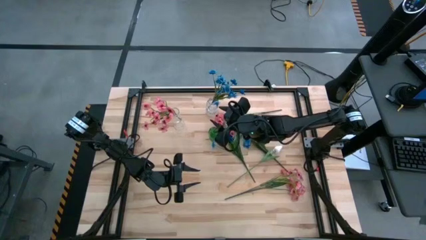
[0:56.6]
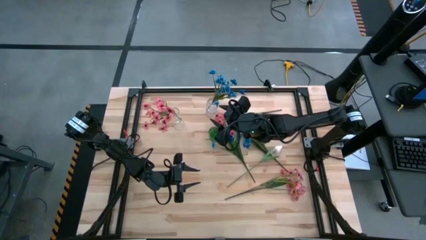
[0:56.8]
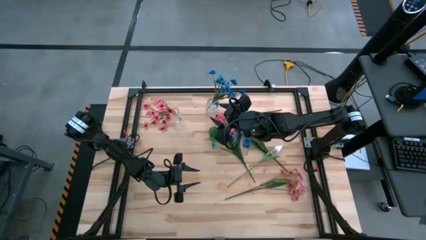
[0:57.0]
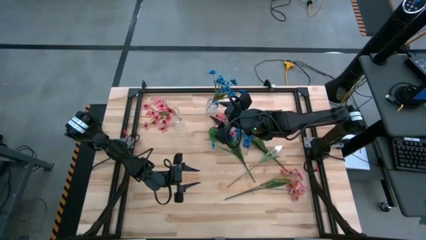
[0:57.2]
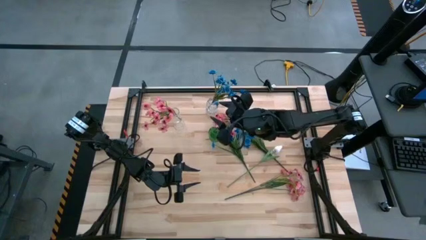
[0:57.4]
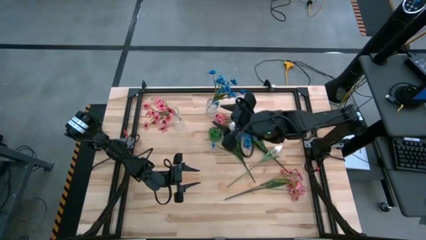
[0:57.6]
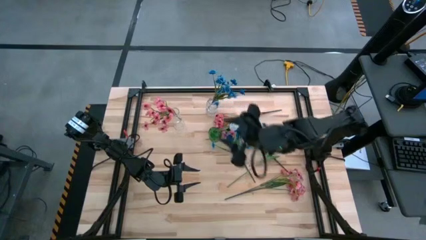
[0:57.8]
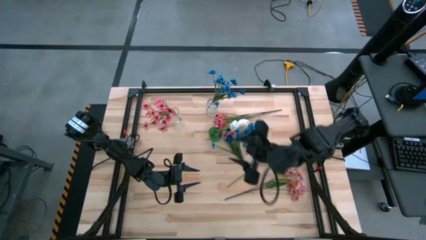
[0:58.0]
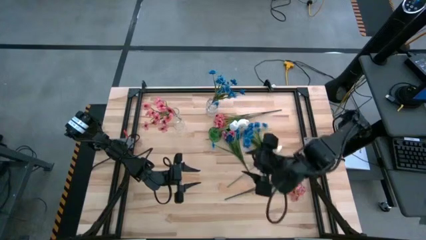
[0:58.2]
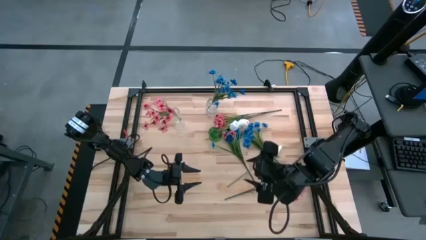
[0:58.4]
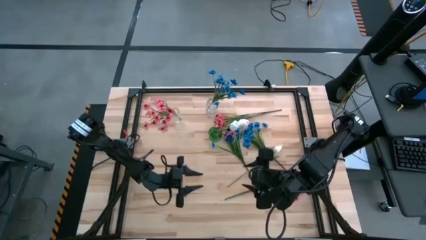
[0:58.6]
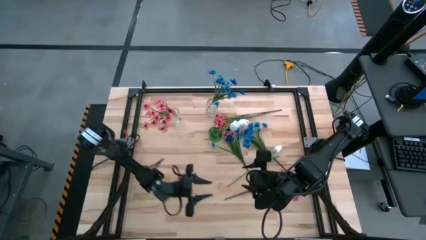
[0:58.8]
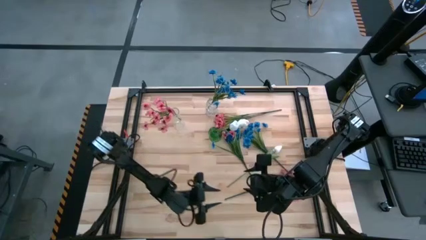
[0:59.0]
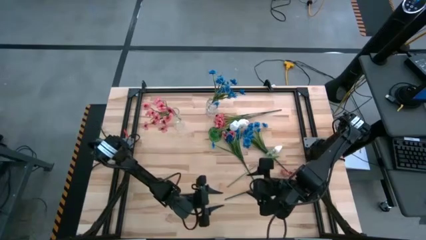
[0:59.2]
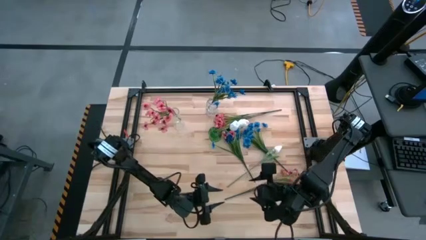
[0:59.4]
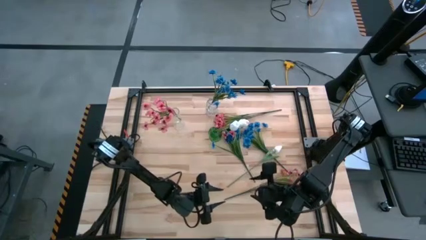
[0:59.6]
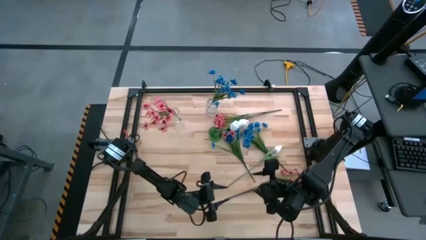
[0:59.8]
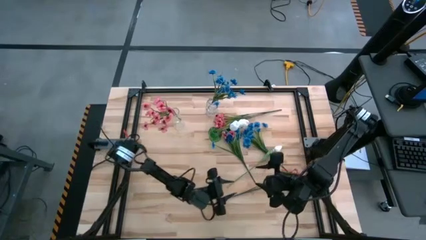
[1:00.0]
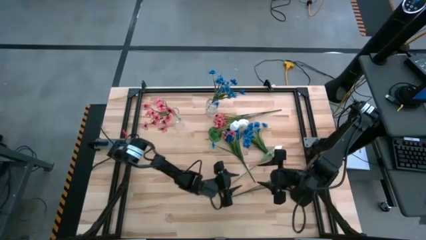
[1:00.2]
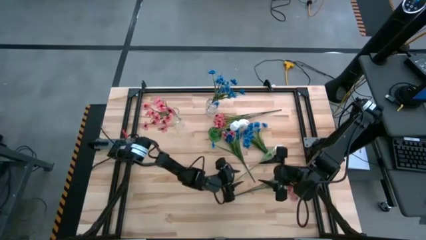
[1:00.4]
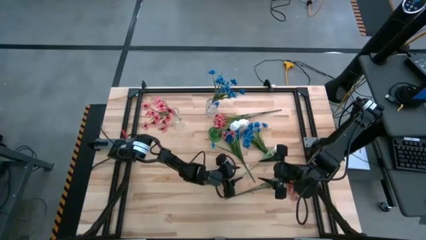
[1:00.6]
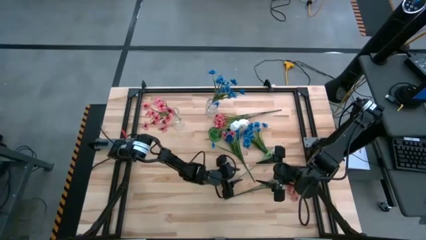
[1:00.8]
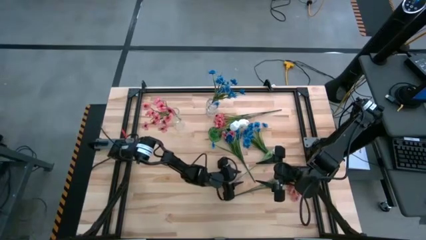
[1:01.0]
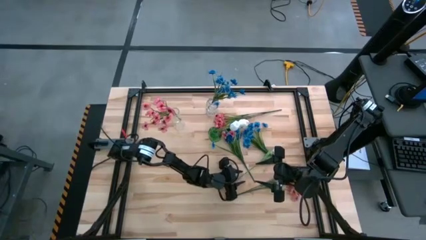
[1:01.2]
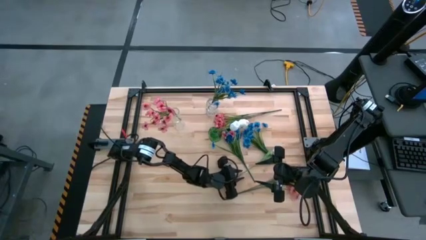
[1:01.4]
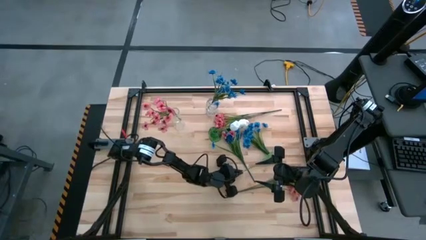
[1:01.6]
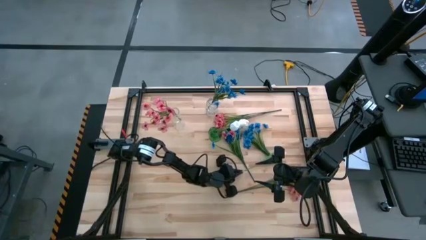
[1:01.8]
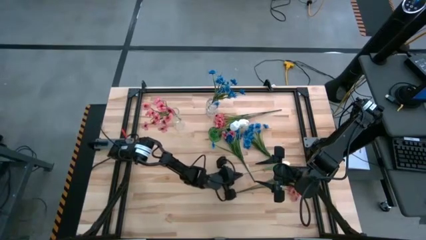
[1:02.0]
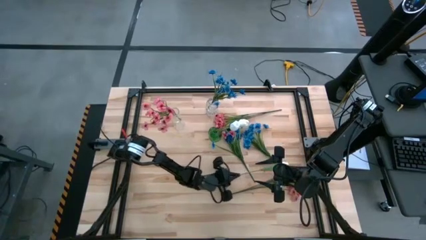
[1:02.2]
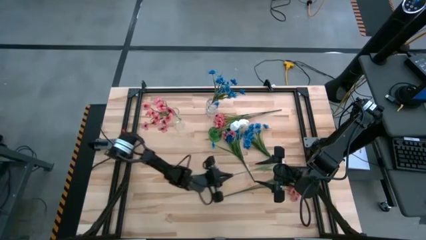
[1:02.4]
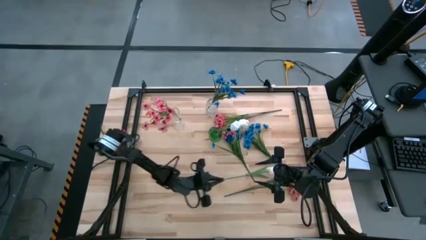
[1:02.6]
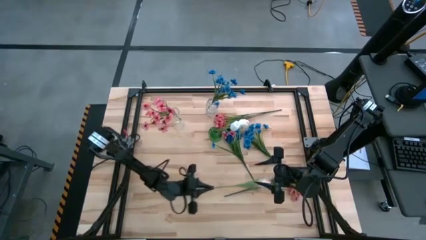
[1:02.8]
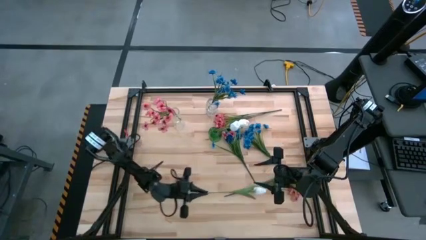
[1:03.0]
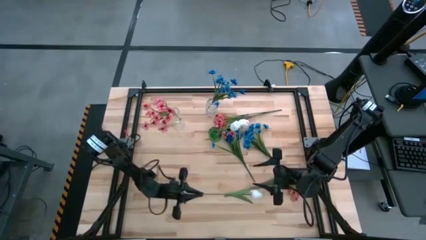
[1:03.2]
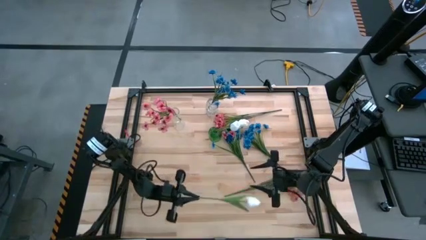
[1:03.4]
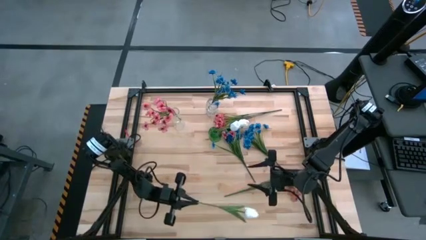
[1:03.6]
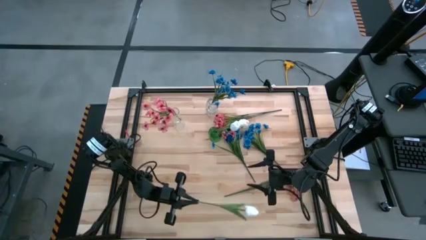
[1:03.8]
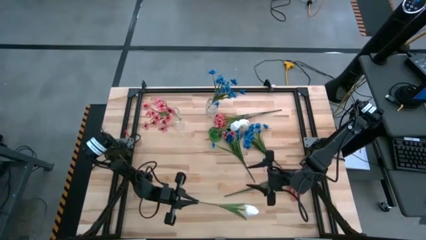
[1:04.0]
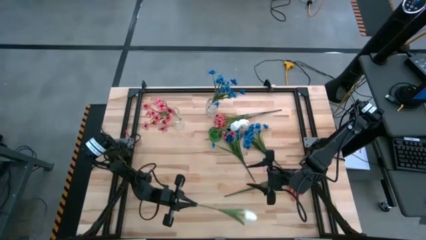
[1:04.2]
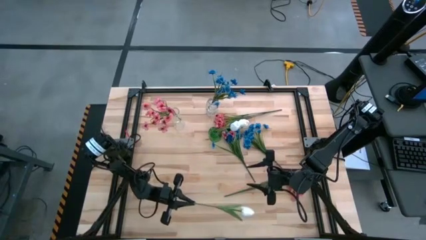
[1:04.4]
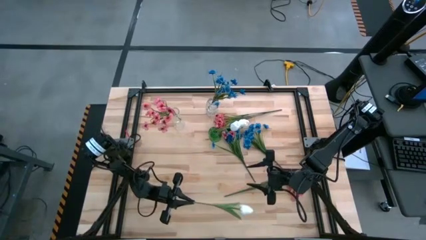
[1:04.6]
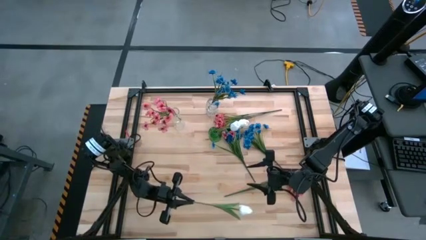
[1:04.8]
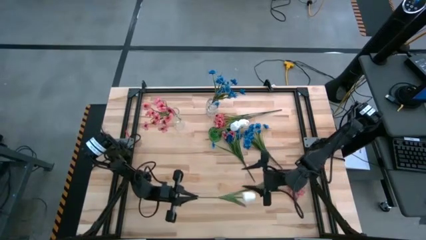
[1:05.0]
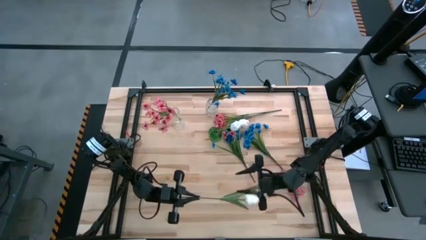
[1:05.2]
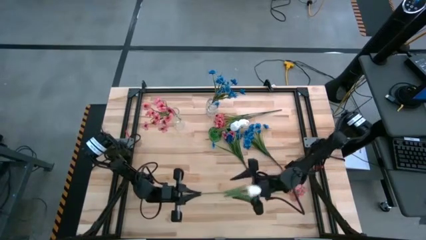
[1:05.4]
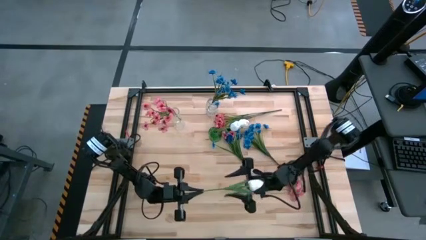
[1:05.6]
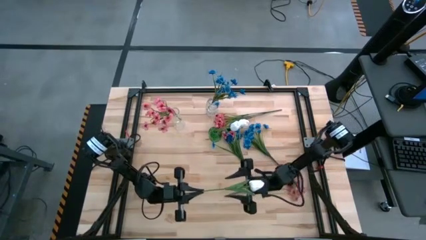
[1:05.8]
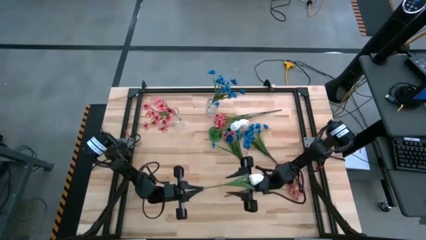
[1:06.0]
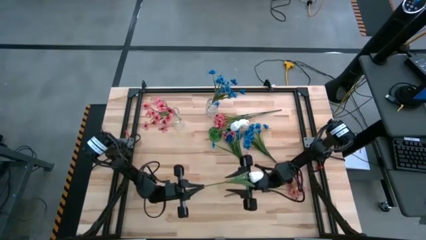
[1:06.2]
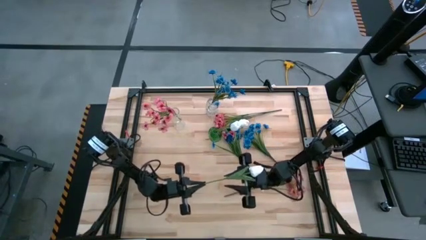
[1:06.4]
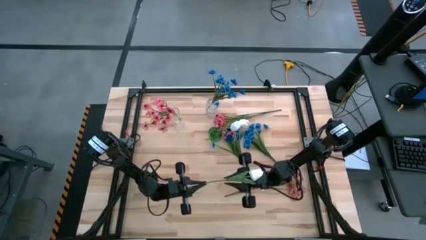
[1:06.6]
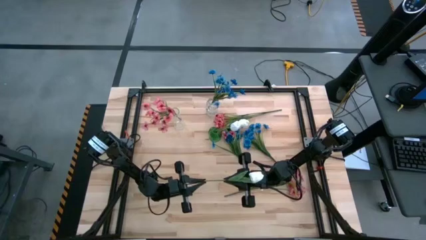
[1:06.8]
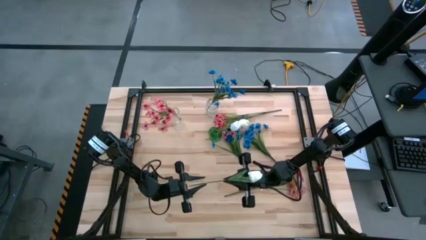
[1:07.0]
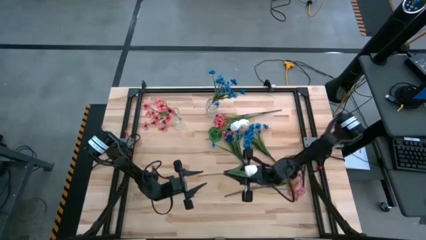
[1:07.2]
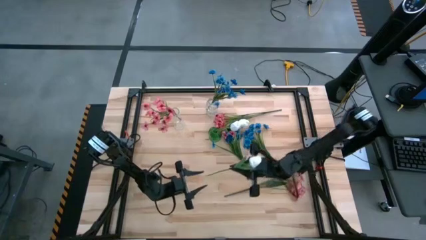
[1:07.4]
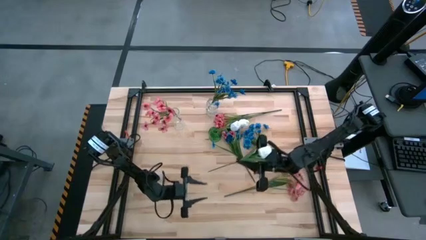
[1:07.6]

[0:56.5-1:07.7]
Task: Sort flowers into vase by color
Put the white tulip flower into the green vase

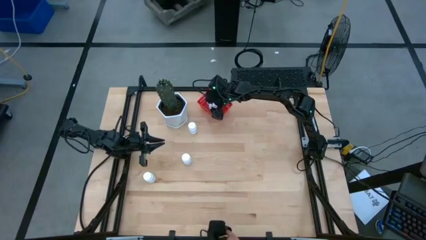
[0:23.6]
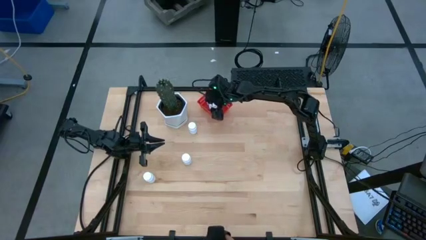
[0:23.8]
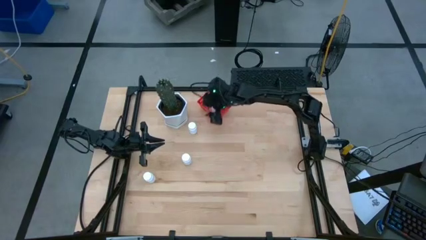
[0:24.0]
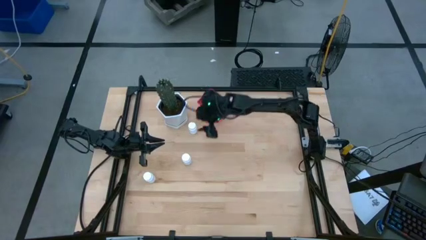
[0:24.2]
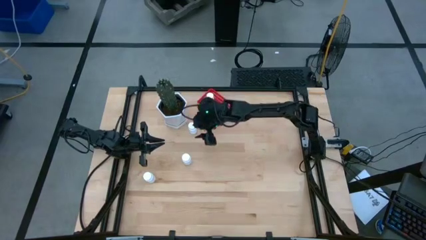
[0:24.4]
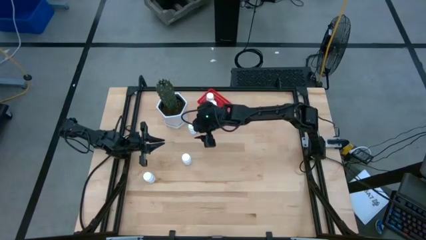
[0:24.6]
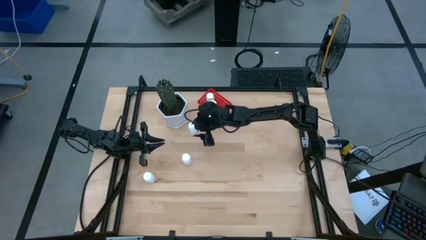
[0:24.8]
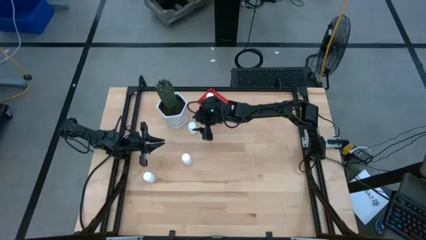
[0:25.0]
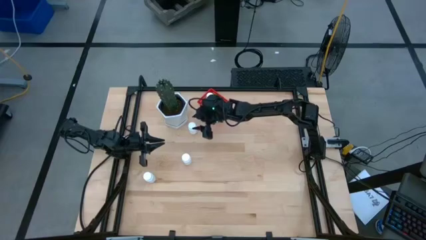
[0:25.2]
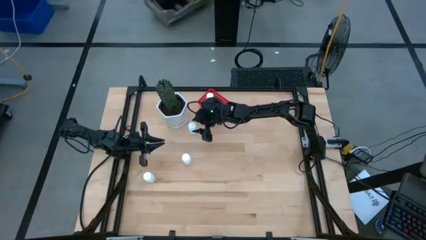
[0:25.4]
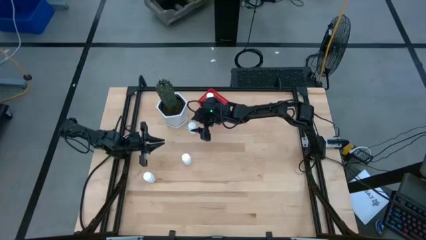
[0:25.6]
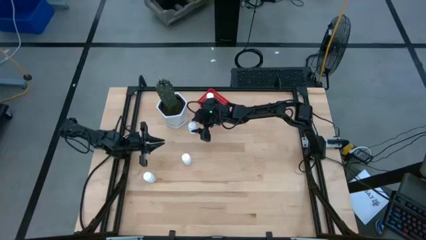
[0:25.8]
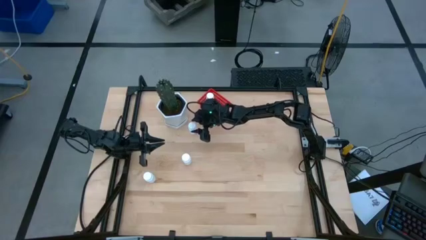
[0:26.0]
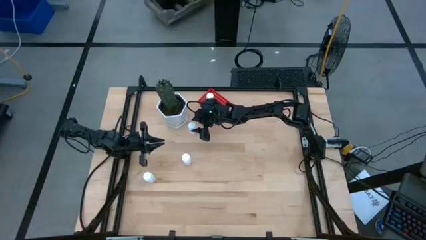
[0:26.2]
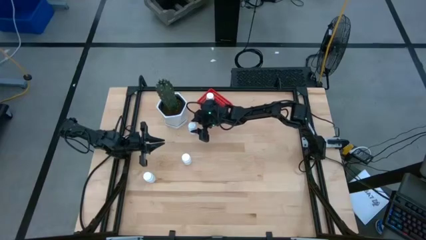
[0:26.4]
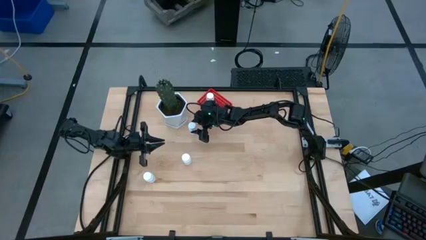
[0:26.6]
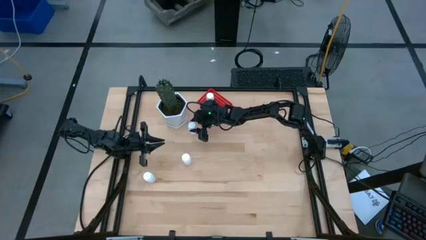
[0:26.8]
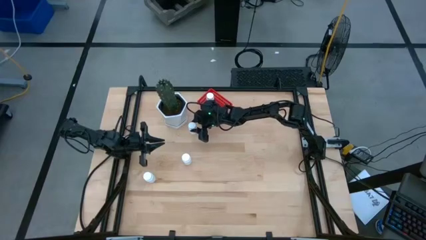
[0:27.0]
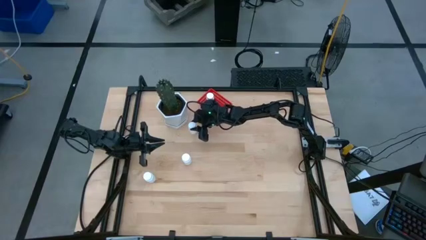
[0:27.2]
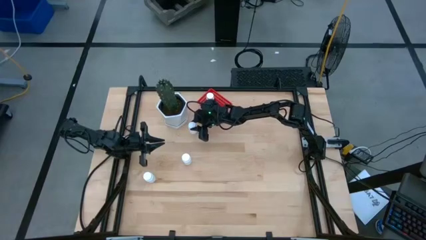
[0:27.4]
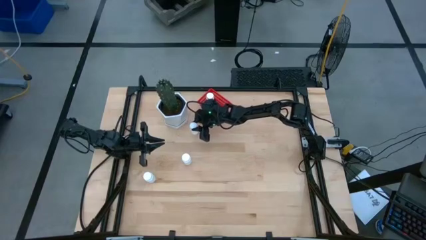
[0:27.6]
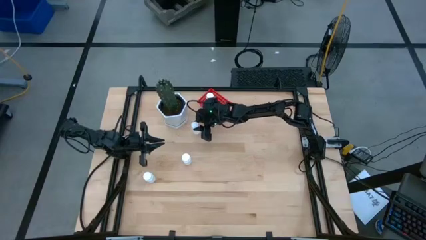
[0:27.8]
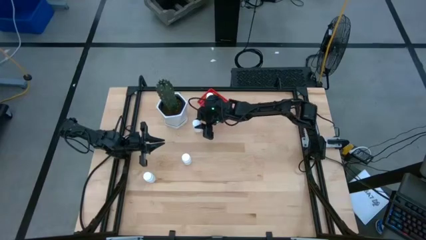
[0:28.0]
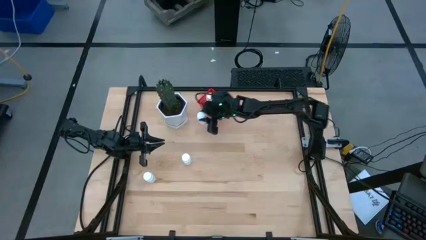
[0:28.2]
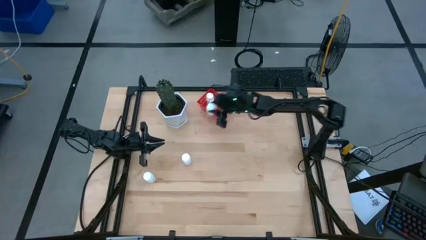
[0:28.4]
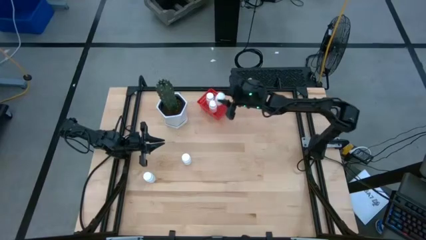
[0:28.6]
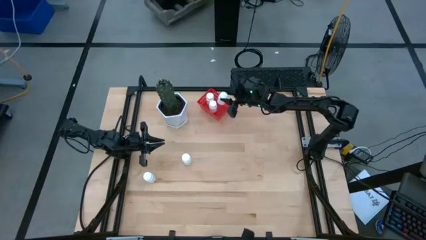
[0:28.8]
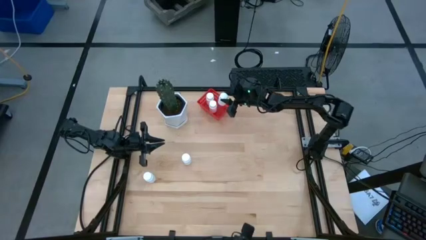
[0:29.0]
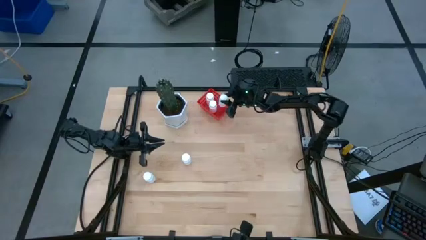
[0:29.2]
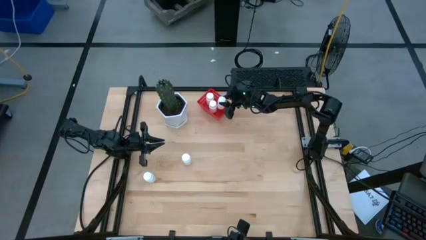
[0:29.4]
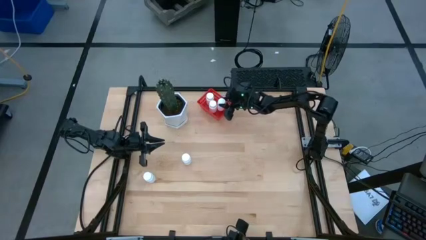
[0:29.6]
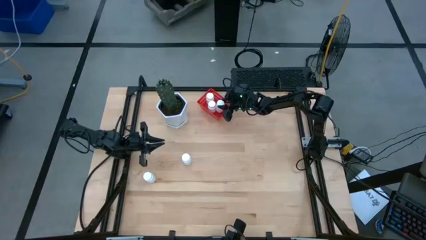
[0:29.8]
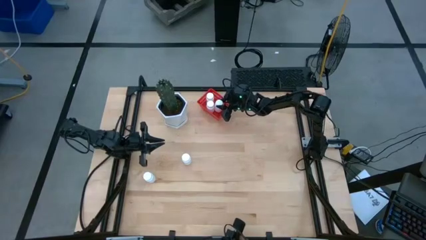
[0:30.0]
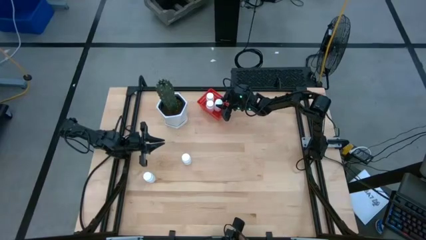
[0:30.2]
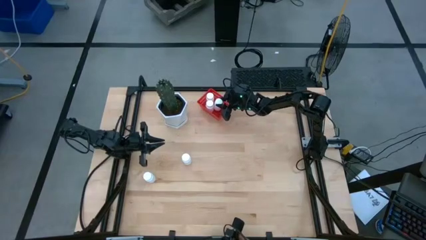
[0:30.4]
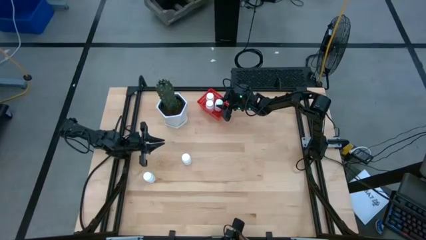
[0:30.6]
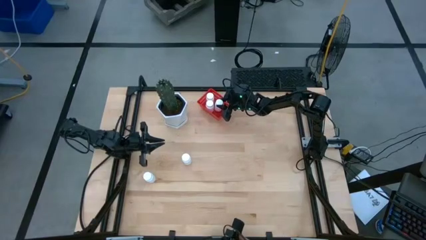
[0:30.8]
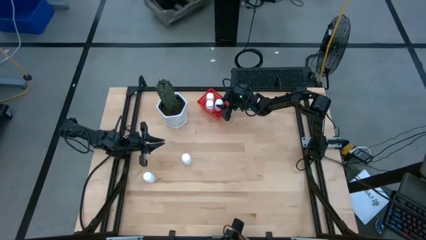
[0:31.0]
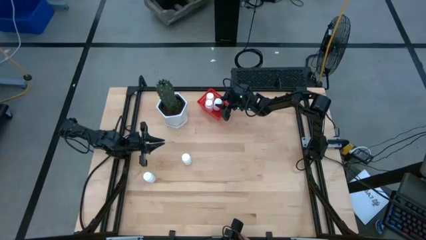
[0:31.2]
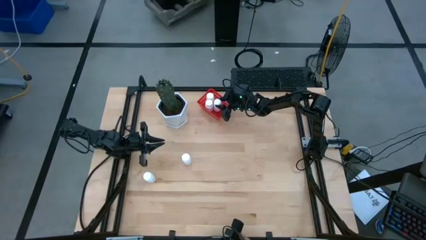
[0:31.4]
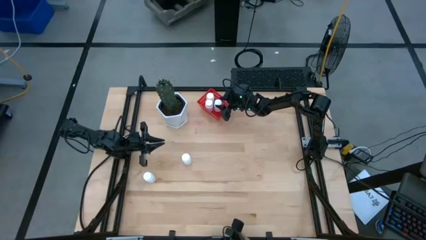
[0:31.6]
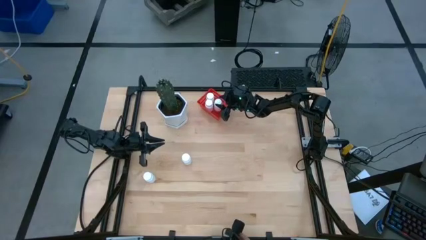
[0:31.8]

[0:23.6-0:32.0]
Task: Pick and place pill bottles into a basket
Put the top white pill bottle into the red bin
